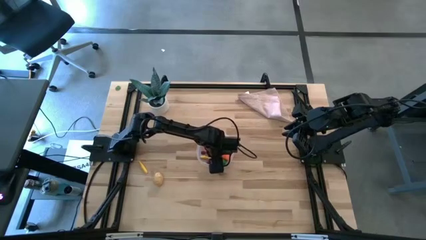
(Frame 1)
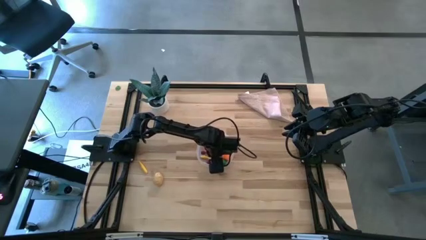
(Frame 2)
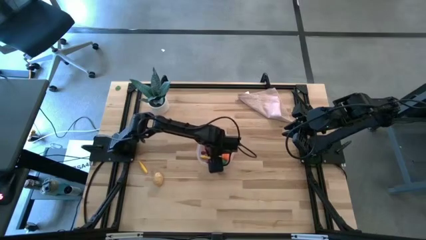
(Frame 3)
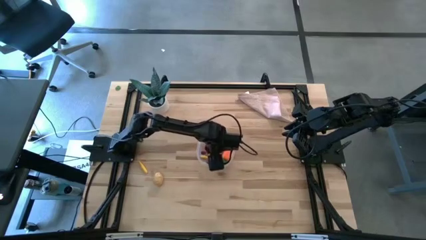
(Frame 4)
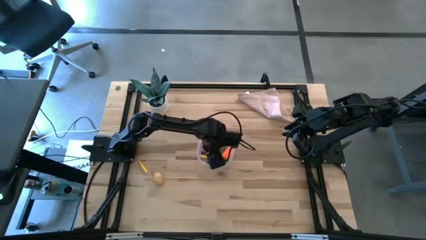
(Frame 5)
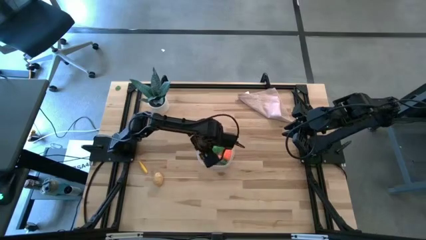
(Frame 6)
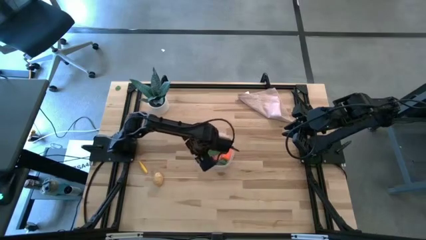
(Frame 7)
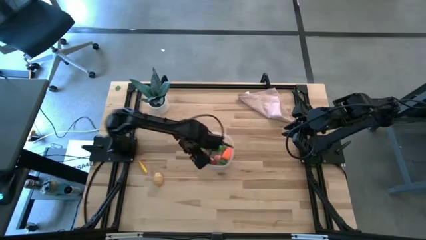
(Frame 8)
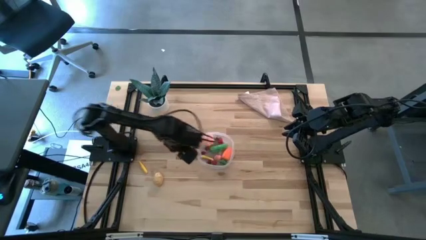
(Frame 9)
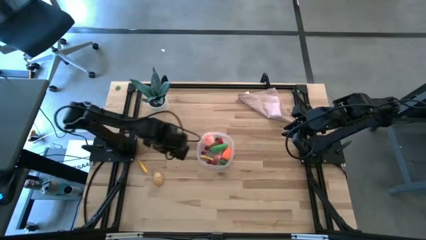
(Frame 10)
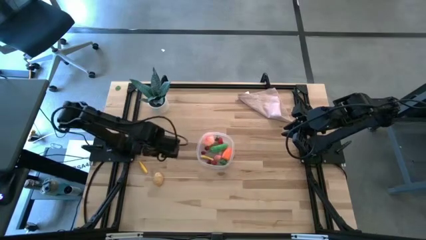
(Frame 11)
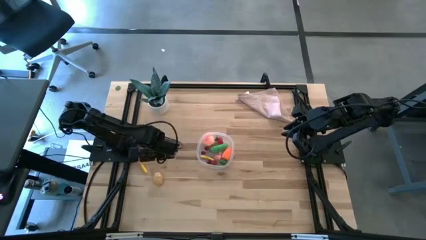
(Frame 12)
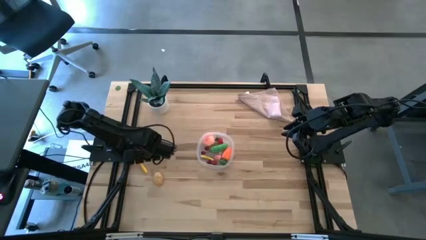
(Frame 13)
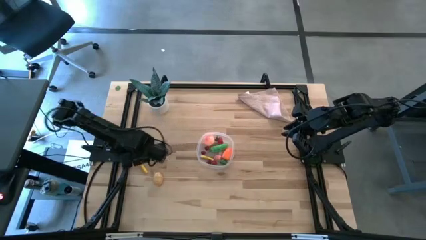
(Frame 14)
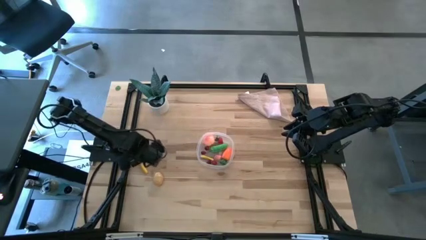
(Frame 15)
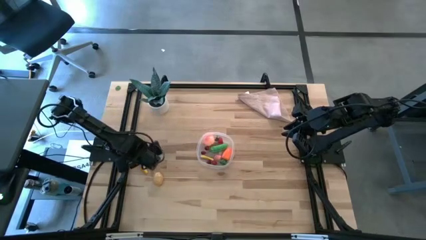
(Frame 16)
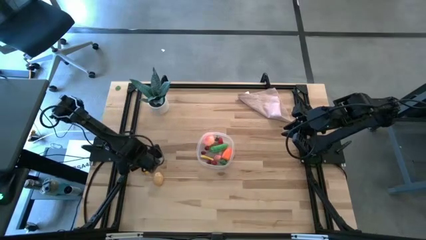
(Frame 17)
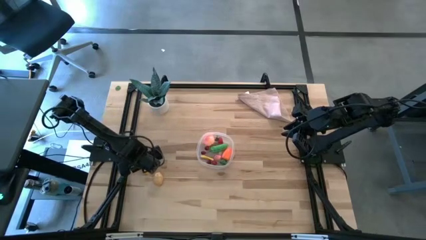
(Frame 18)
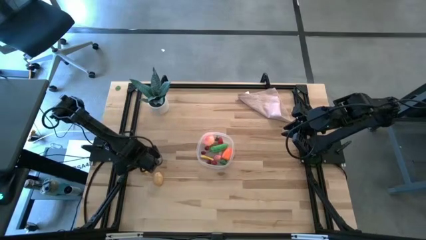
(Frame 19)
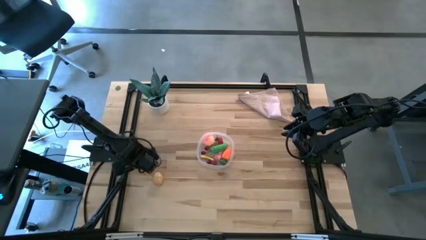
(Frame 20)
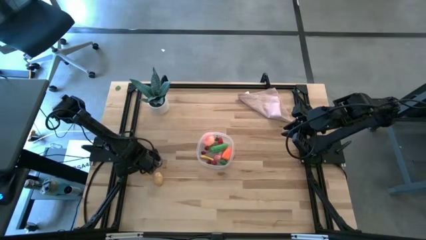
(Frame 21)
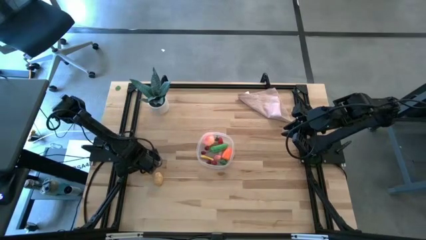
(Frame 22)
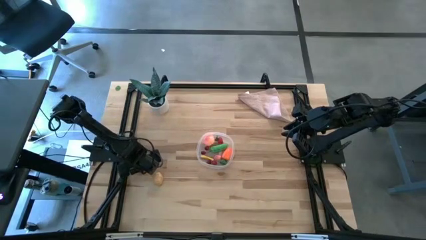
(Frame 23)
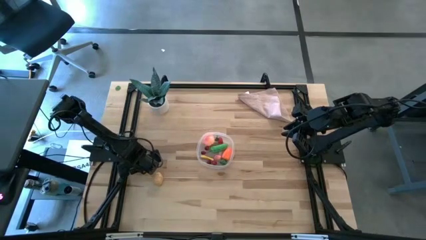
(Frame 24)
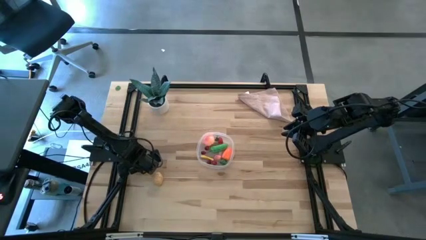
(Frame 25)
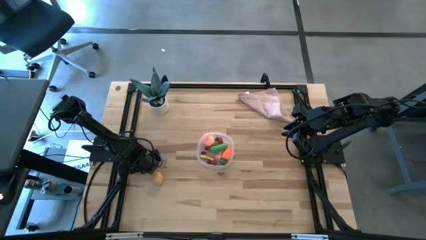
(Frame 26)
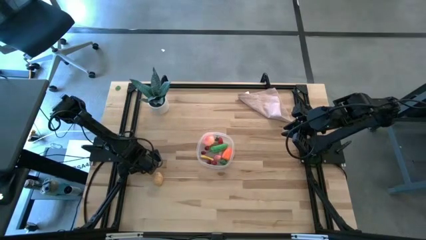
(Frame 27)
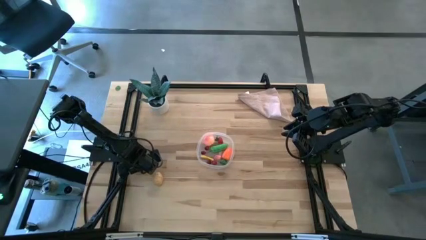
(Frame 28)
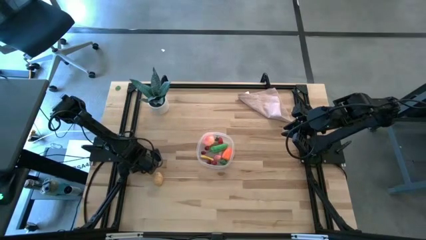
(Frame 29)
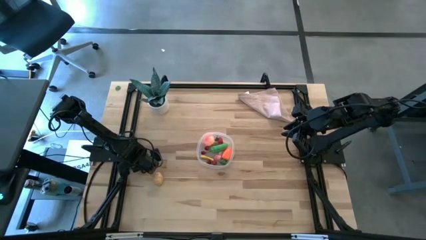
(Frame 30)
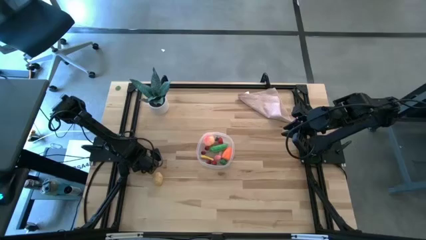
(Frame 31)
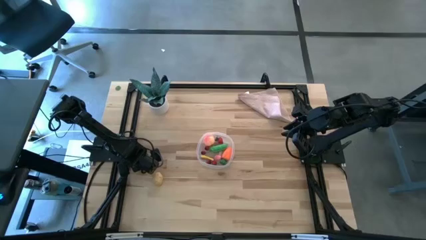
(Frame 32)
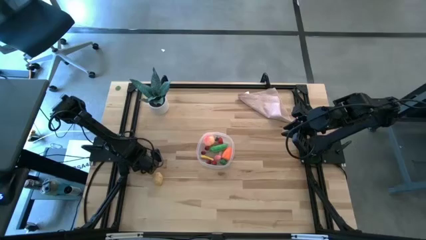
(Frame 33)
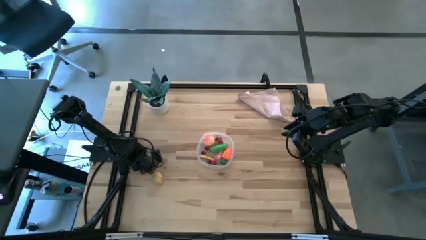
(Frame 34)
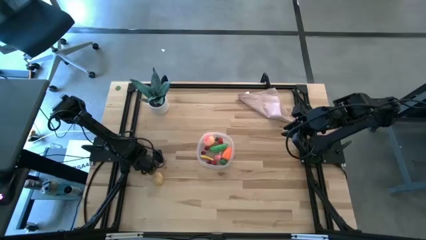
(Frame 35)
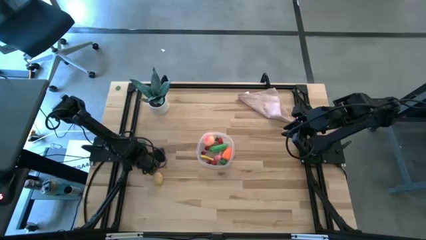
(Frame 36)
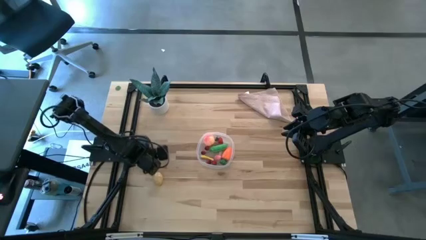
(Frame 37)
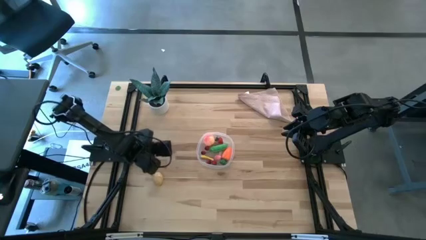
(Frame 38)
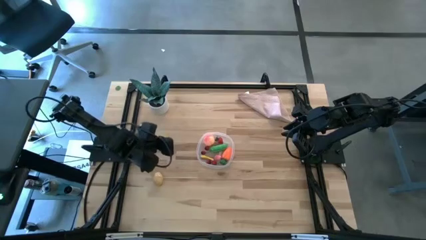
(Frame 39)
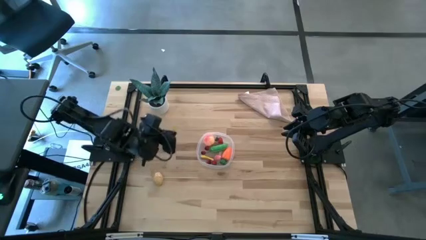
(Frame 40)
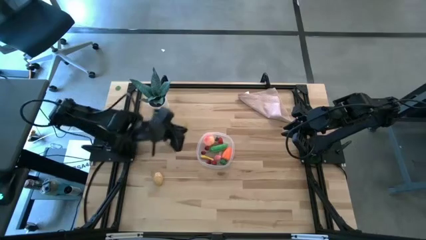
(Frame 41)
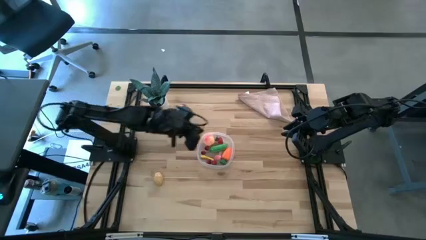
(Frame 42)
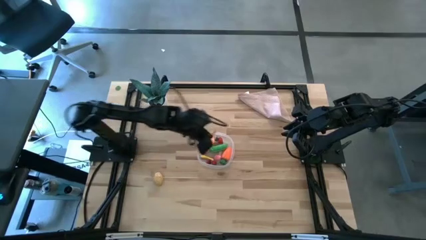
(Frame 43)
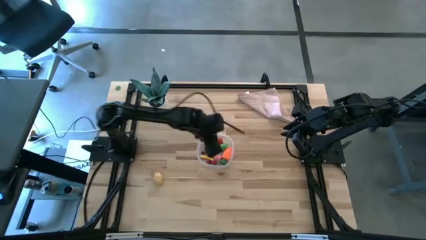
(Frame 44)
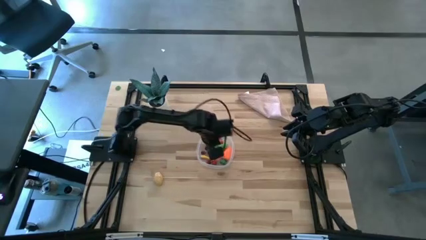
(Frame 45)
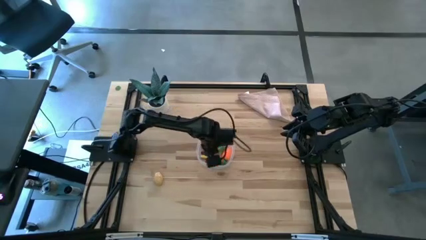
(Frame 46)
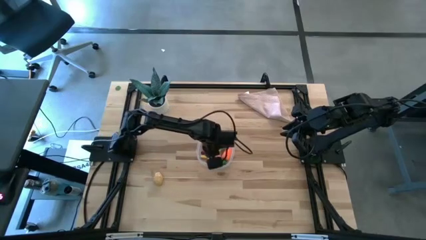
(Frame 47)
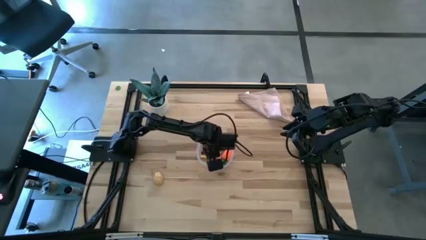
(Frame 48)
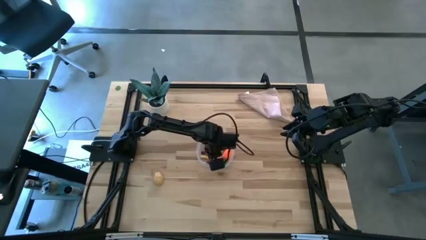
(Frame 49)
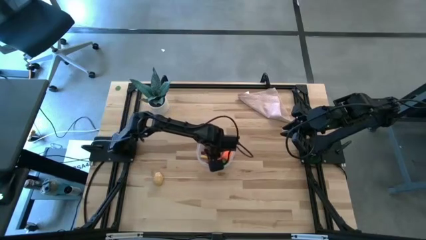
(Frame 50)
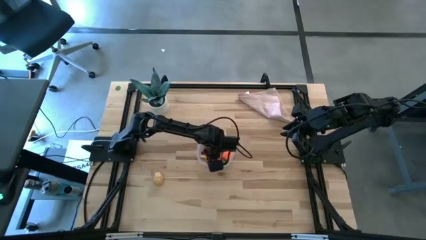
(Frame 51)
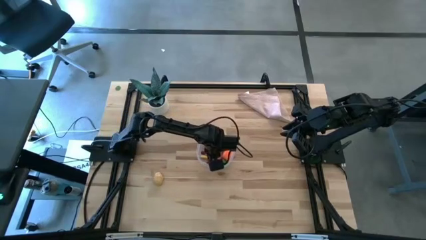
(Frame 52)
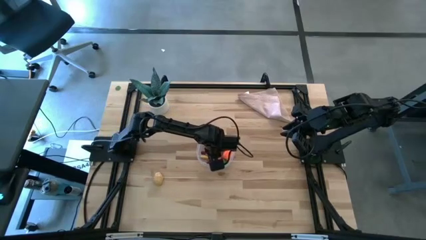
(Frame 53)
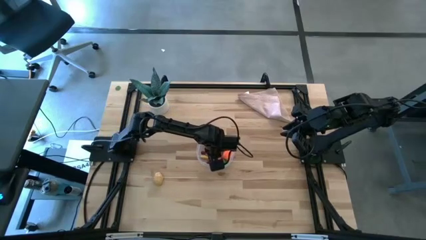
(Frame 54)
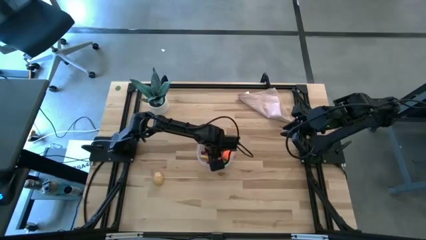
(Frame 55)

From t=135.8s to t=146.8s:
Task: Pick and placing Produce into tupperware
Put the yellow zucchini into the transparent bin

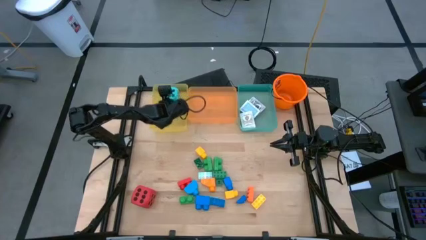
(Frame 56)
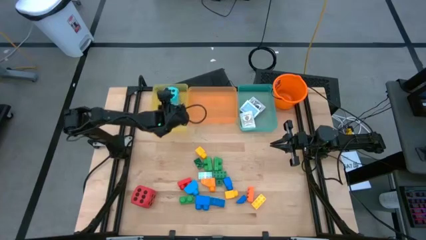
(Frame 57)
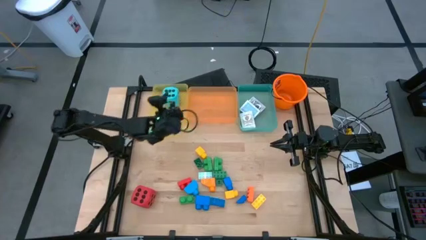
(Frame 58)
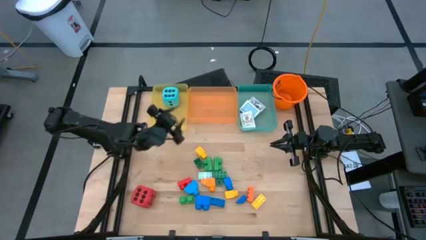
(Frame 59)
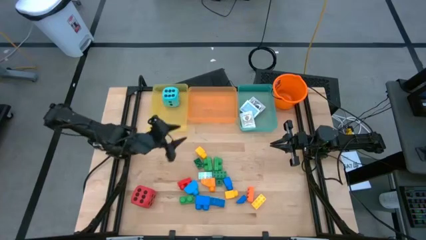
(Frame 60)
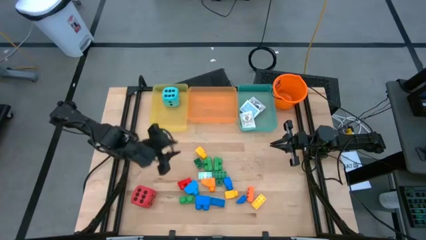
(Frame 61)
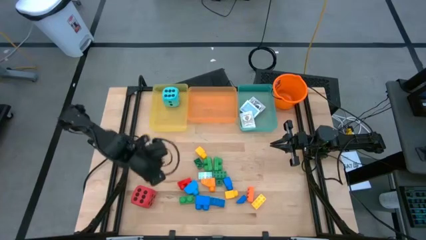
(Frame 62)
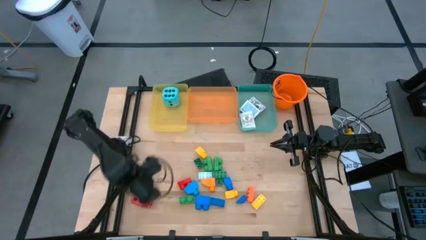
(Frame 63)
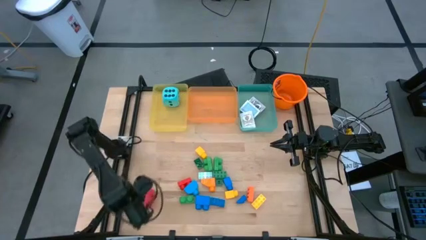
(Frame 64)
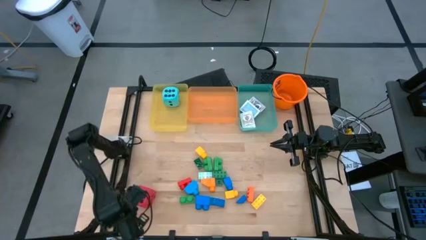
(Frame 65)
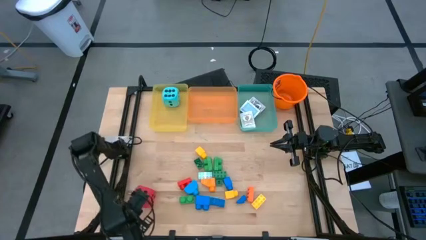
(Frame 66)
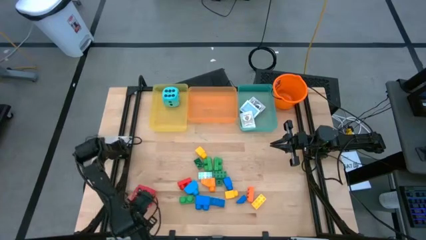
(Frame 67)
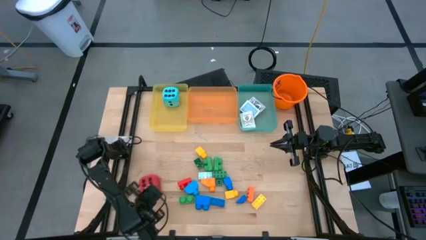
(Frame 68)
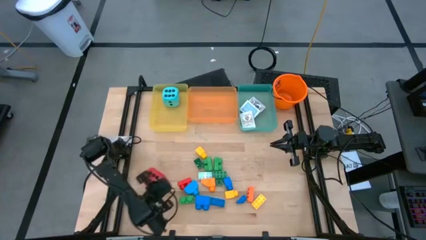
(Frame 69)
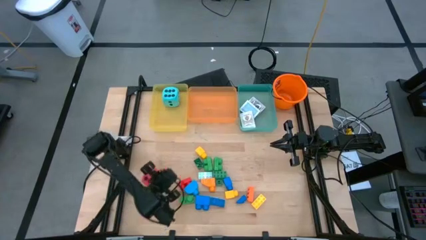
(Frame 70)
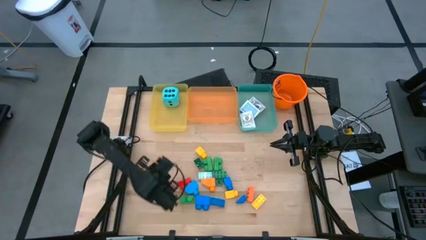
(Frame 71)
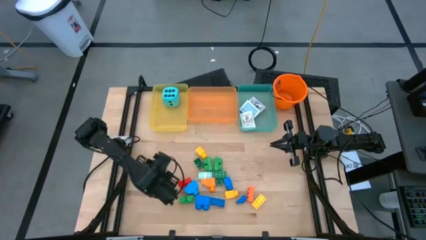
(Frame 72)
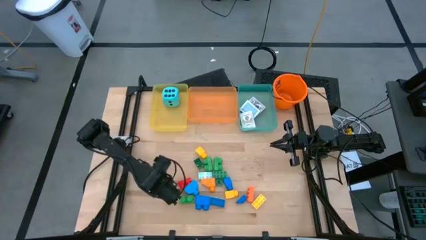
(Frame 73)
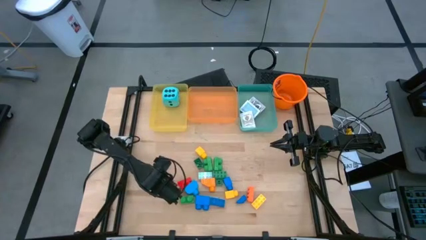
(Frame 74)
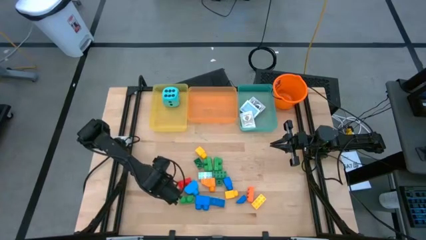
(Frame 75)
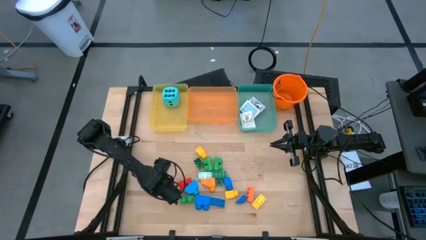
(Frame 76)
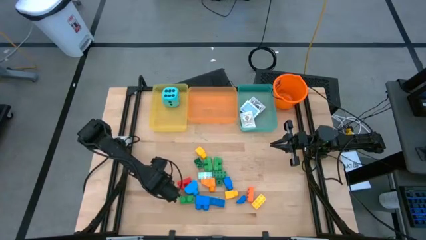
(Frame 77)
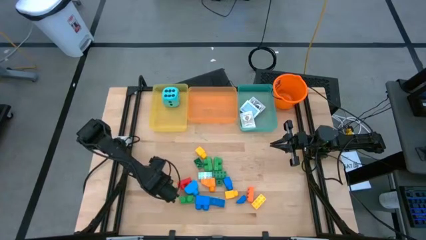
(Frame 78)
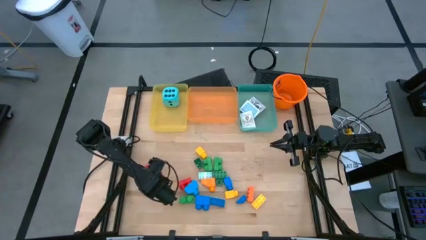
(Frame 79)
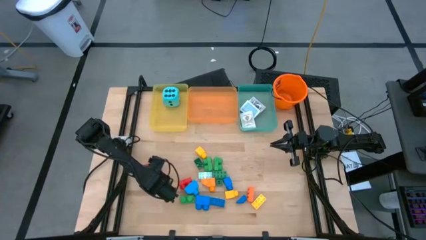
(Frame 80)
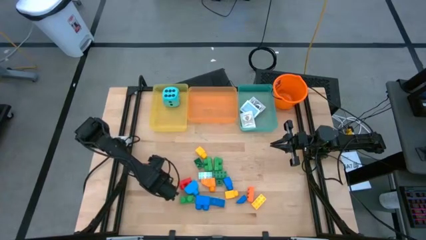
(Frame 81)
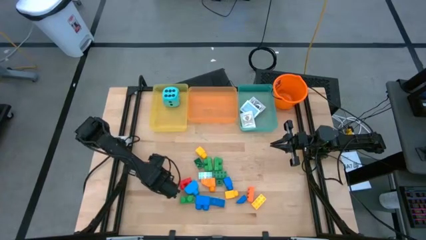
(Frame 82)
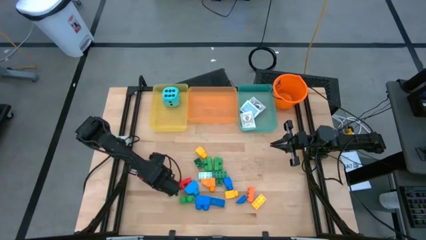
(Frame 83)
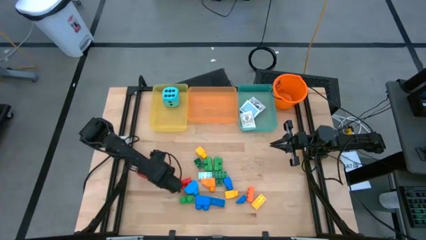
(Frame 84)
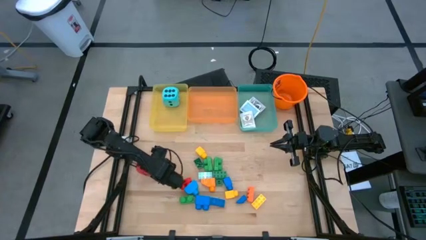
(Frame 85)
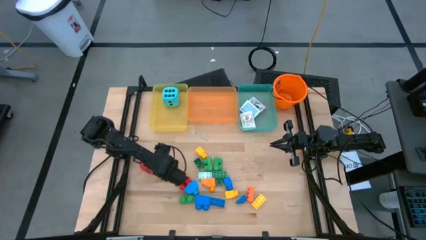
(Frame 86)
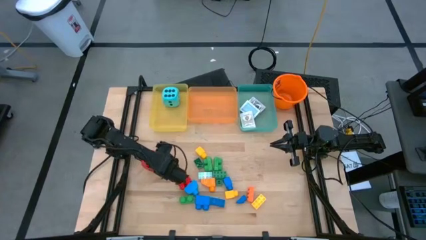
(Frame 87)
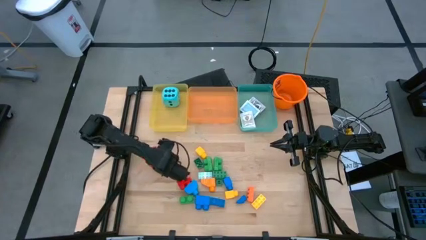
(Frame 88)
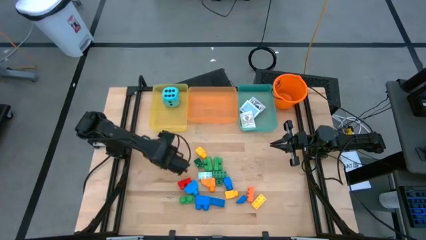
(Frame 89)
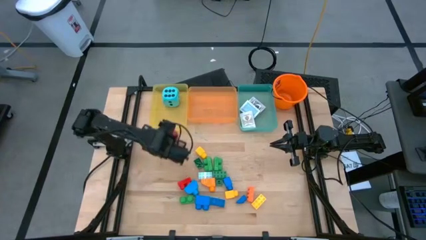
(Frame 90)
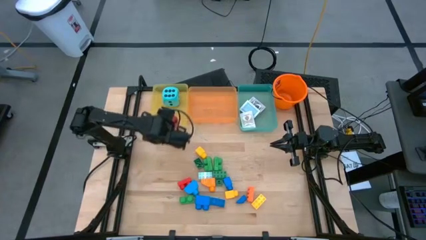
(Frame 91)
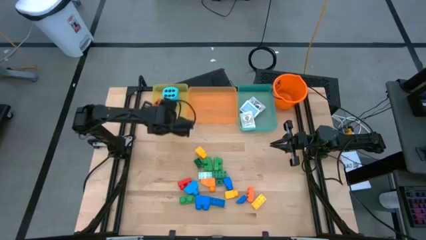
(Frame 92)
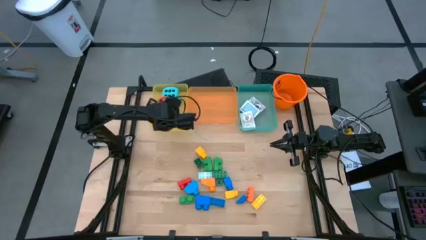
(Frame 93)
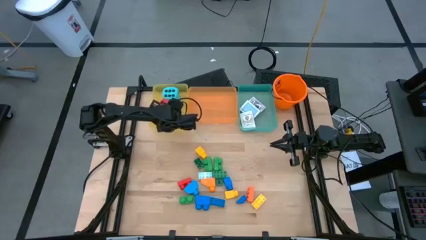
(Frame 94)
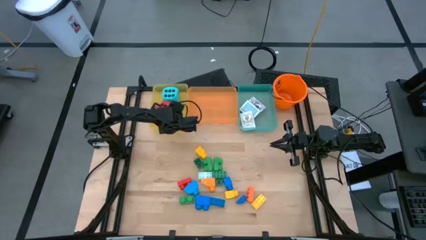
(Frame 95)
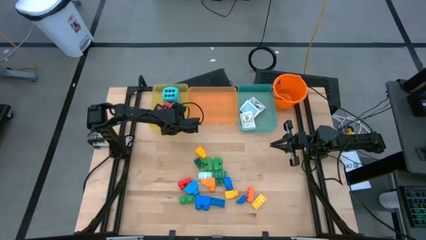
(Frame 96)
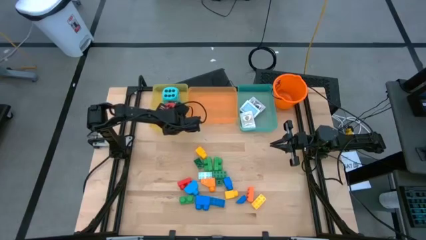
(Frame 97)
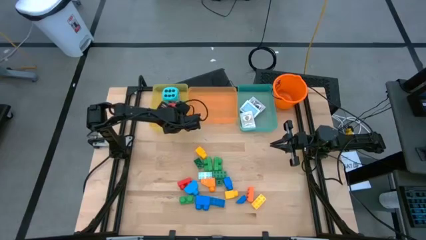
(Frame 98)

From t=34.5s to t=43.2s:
Task: Pick & Place Toys
Put the red dice into the yellow bin
